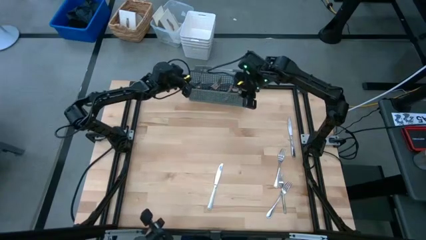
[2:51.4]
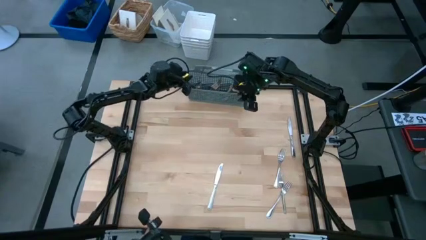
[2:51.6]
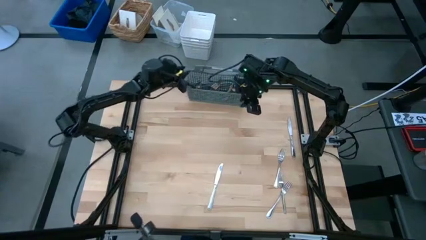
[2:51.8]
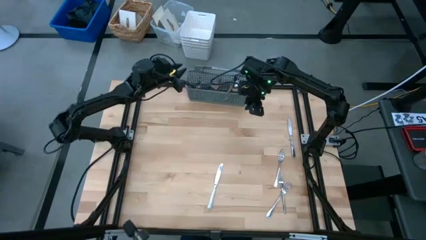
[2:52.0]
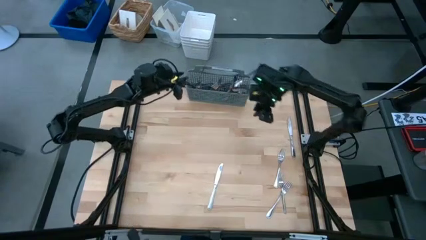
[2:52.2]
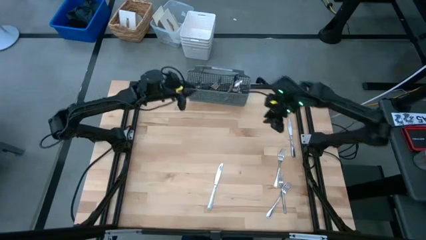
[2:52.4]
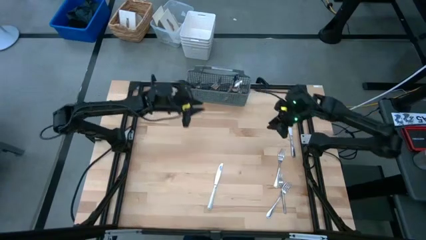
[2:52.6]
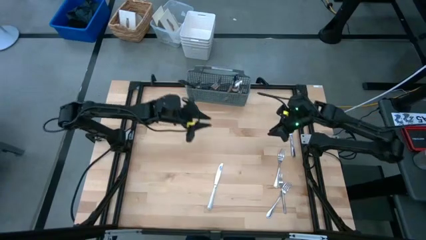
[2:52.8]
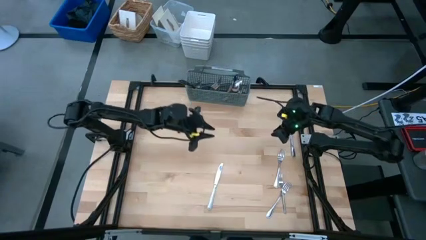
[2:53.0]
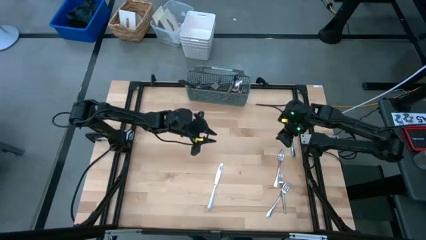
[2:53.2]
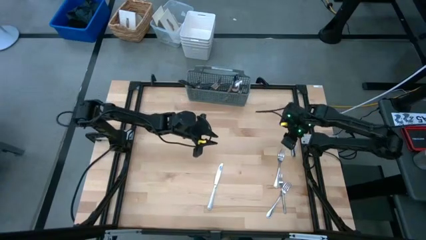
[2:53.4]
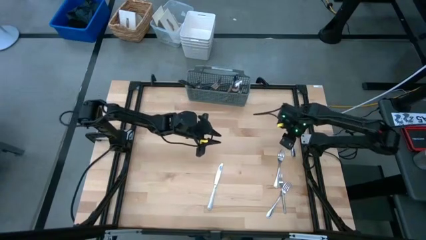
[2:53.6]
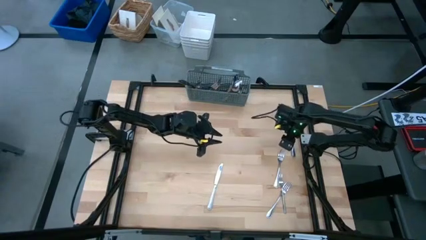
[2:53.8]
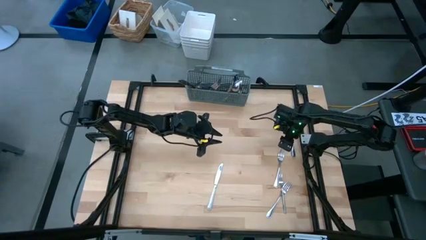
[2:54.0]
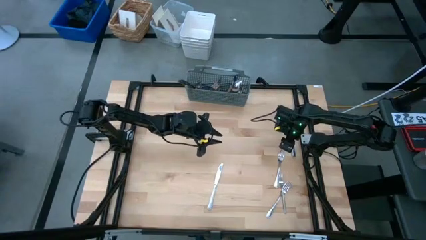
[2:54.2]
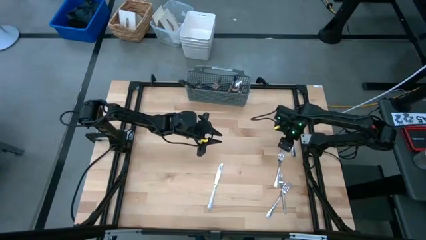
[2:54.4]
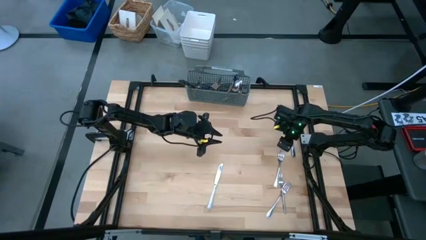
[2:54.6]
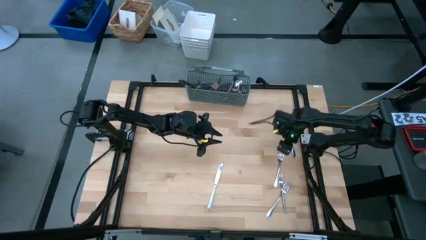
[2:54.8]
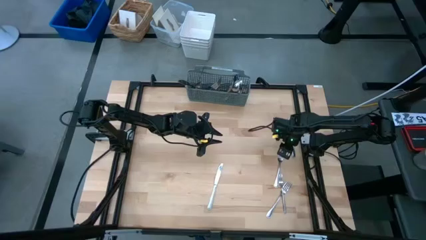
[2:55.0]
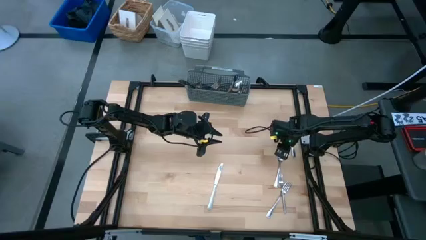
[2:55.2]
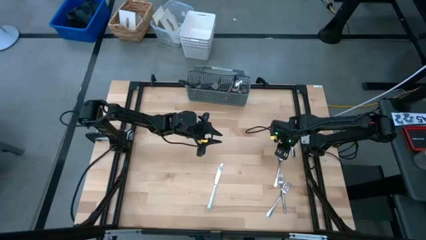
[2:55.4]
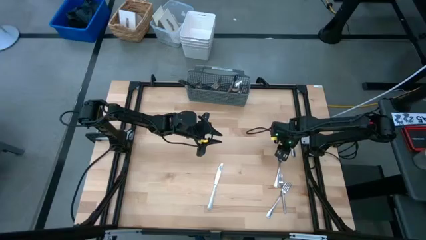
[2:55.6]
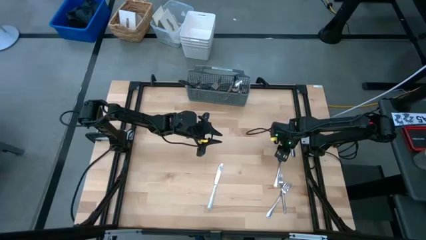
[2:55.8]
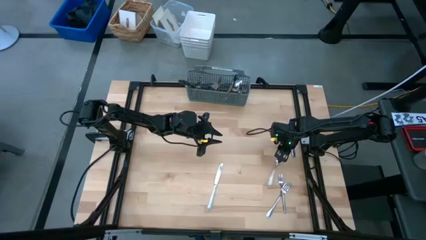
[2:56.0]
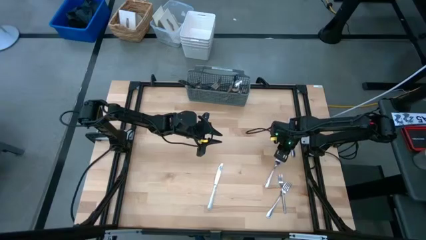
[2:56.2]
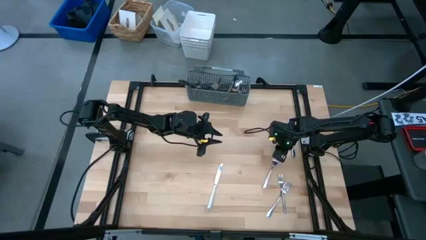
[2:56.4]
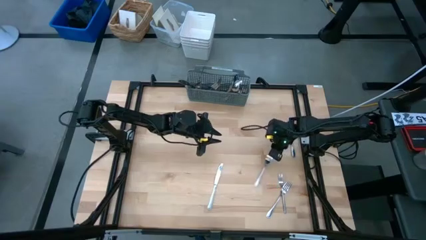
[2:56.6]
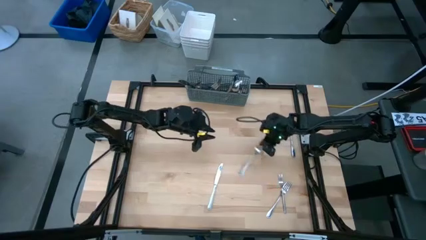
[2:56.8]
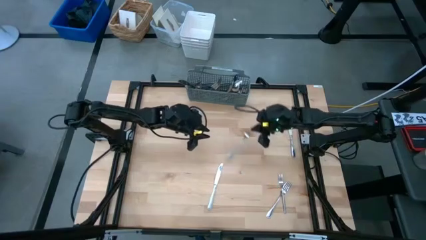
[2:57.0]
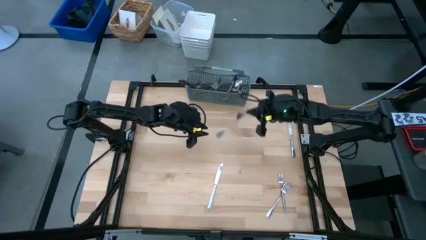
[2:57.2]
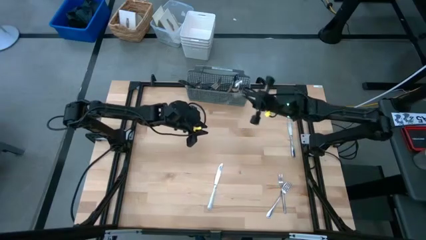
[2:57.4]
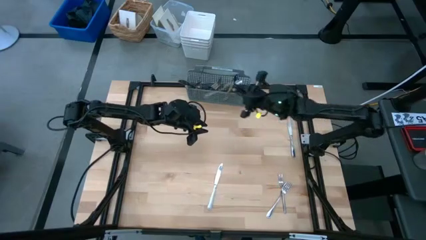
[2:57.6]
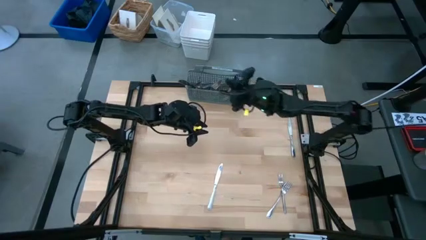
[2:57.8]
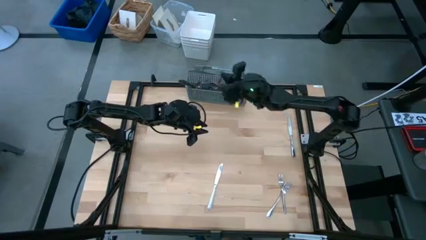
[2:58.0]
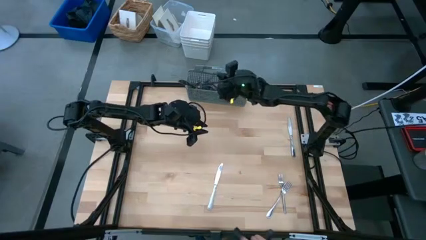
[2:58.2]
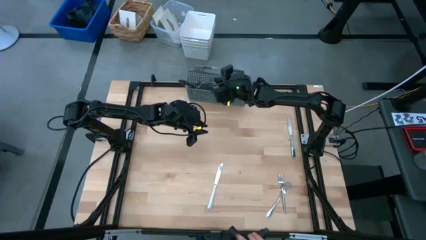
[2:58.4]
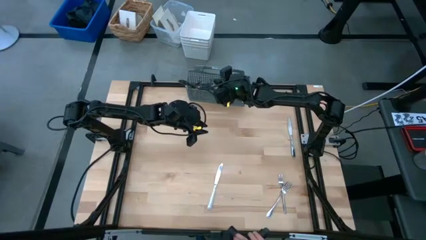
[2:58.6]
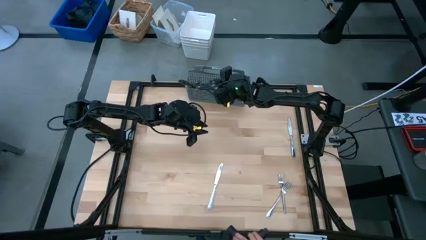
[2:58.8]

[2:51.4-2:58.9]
Task: Sort silverware
Put the table knife into the gray silverware organizer

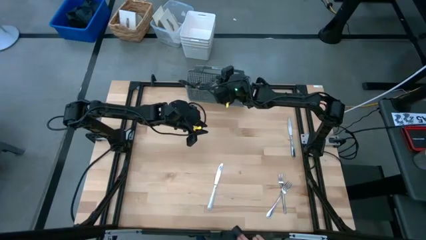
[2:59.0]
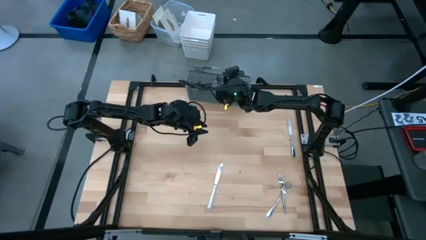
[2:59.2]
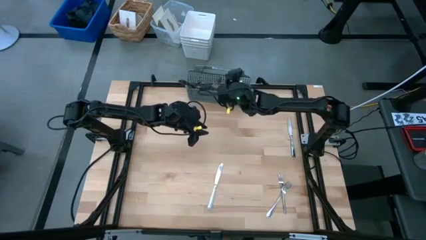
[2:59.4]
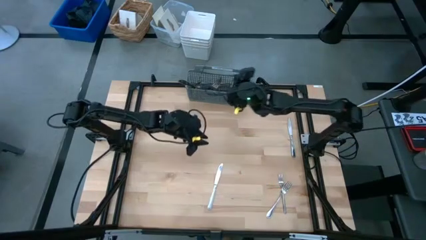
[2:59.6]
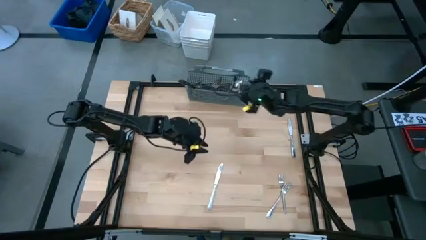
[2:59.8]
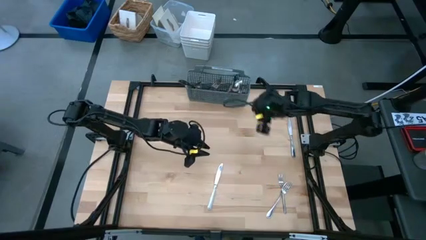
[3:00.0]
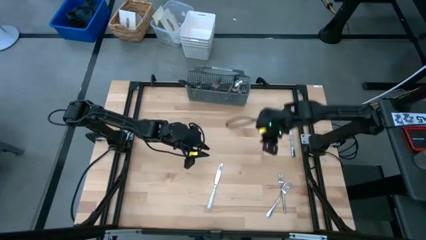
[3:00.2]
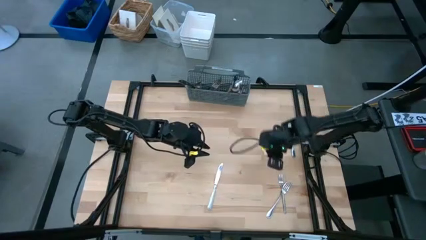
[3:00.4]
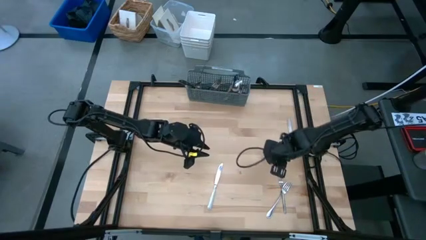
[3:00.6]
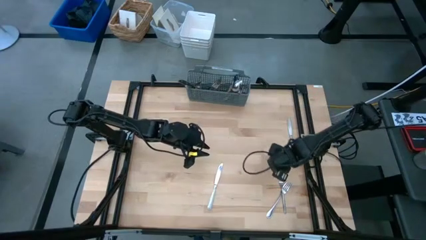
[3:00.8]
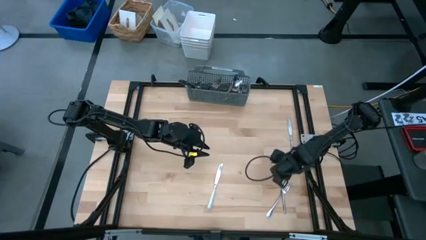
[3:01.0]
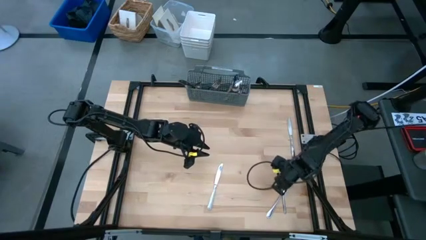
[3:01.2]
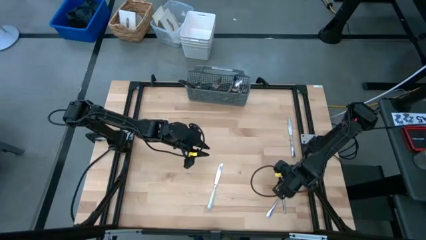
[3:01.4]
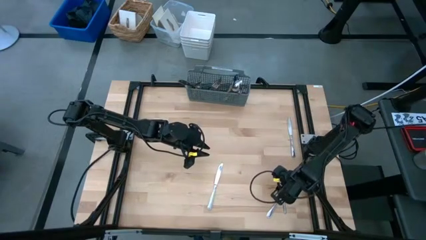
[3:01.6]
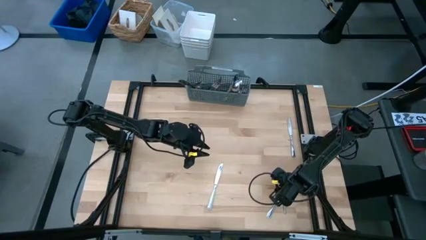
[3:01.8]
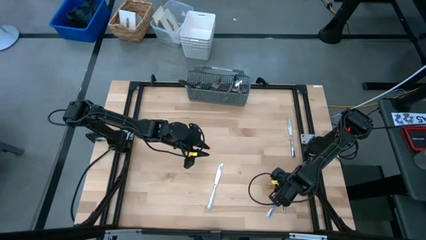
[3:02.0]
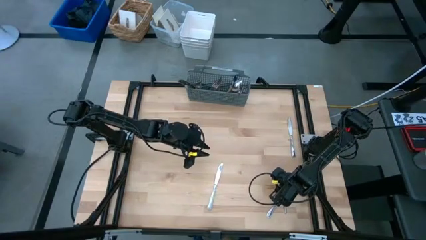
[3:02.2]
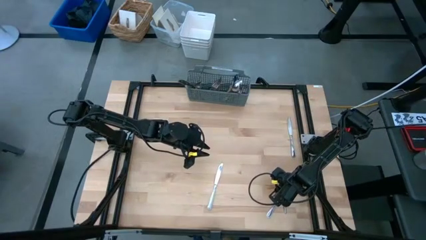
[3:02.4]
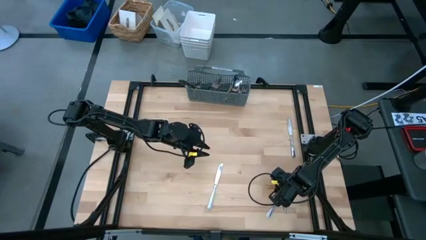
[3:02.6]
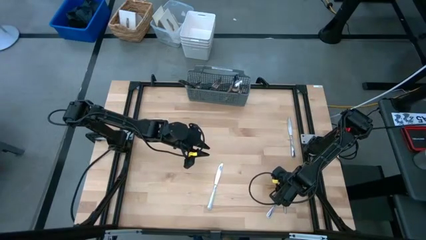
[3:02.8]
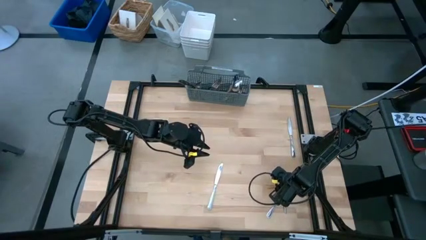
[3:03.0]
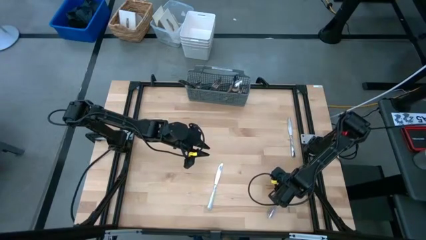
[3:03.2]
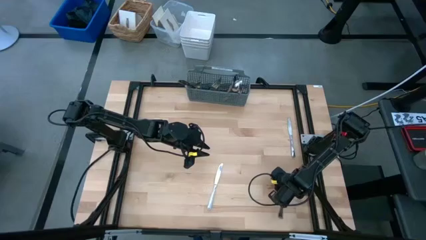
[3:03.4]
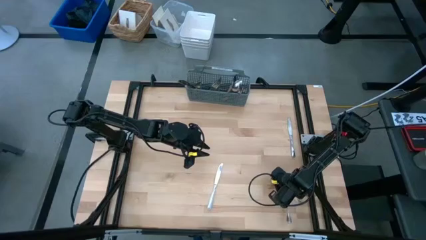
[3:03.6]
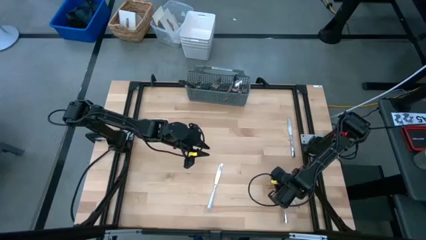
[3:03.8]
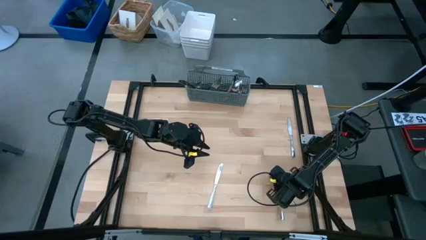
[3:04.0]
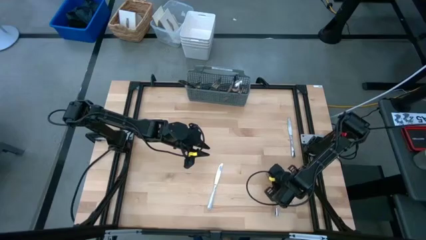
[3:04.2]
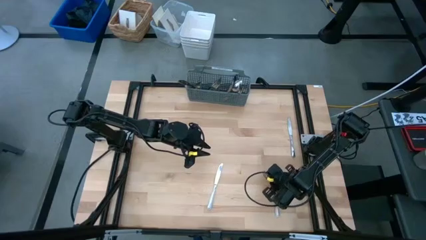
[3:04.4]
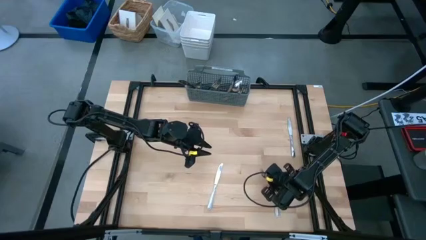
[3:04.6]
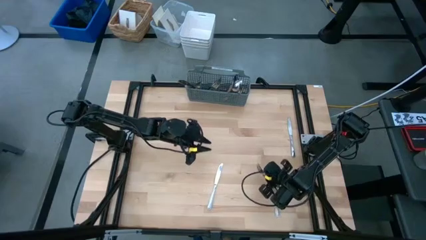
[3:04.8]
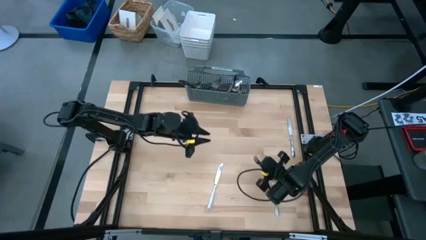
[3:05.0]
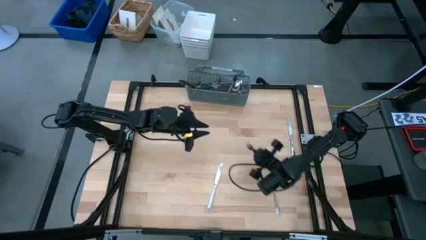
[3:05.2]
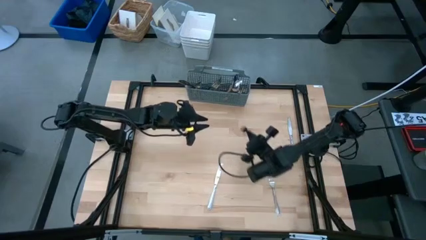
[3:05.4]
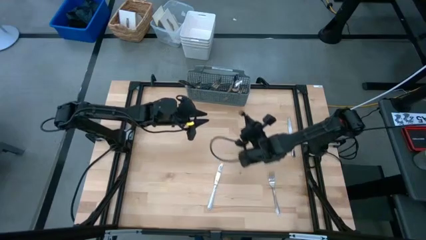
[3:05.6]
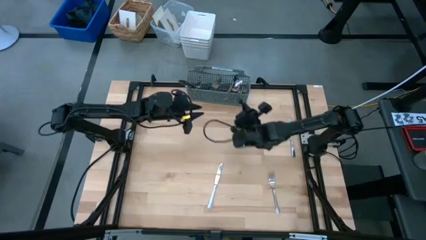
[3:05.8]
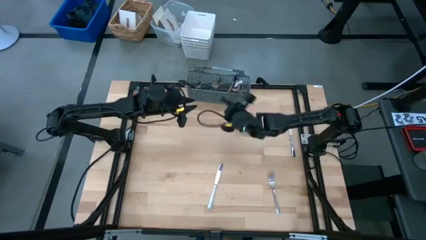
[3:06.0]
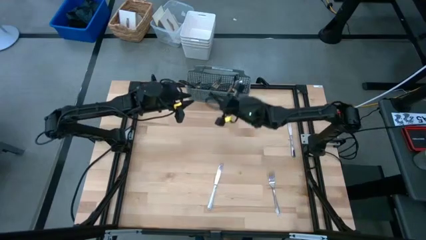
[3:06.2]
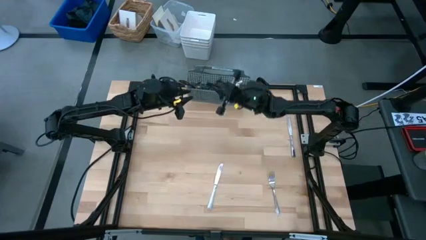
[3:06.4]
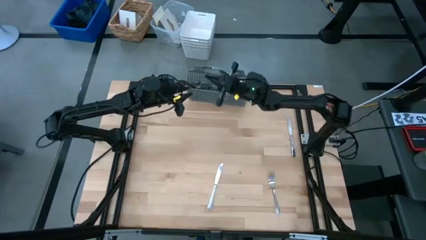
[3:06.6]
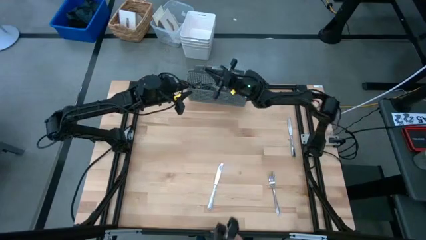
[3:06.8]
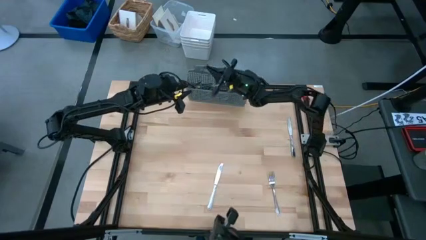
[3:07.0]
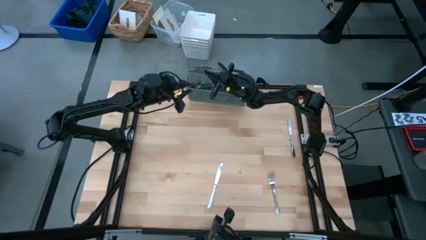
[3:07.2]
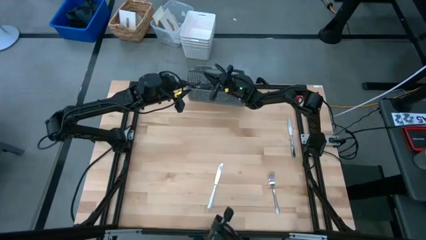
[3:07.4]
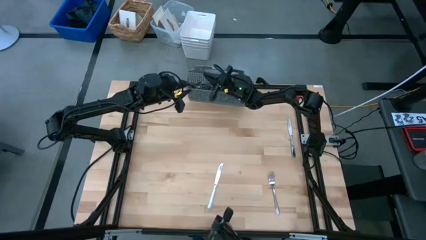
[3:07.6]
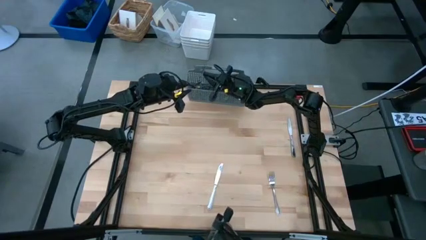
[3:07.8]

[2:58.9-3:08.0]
Put the fork into the gray silverware organizer
